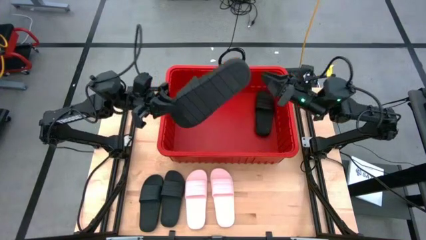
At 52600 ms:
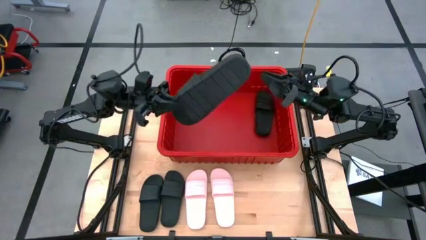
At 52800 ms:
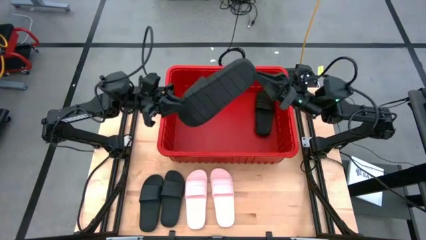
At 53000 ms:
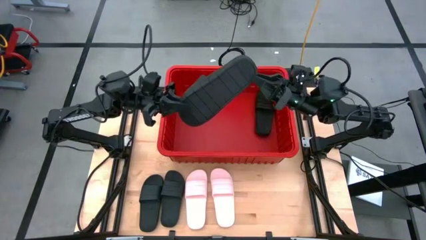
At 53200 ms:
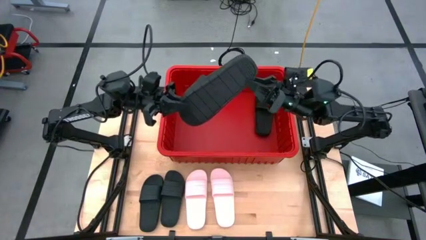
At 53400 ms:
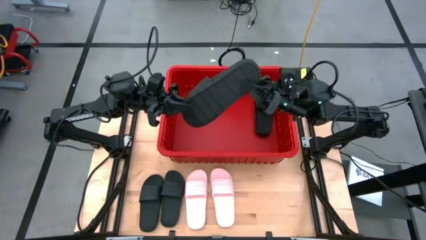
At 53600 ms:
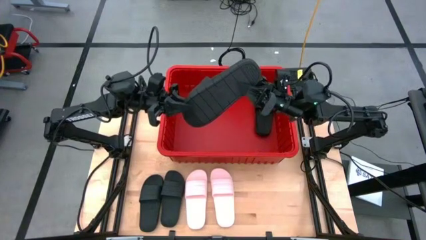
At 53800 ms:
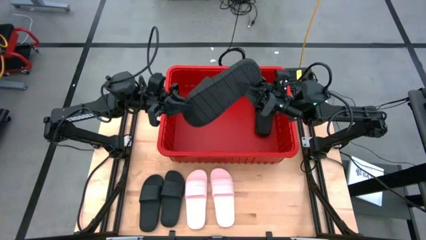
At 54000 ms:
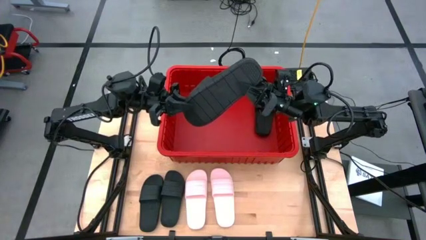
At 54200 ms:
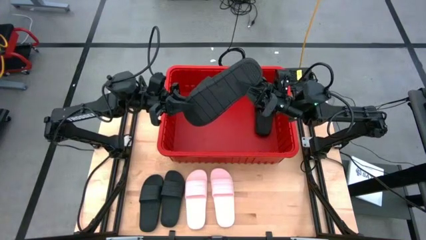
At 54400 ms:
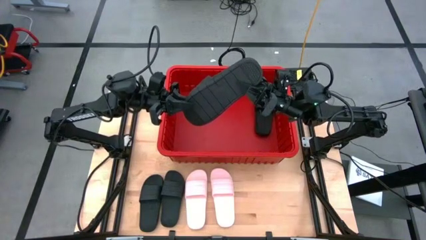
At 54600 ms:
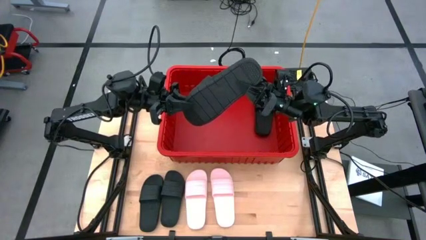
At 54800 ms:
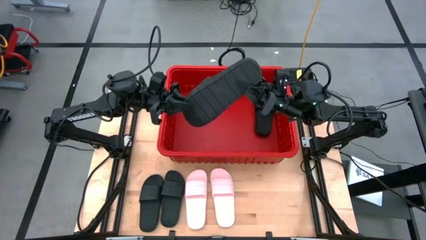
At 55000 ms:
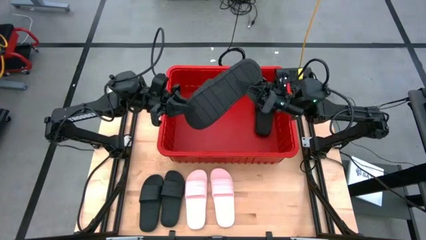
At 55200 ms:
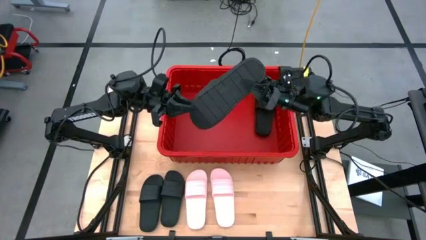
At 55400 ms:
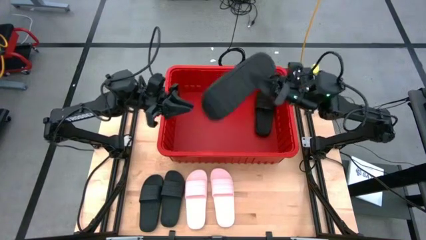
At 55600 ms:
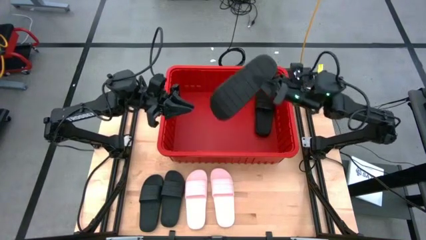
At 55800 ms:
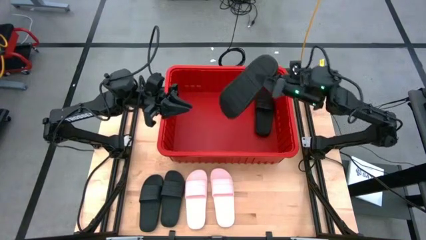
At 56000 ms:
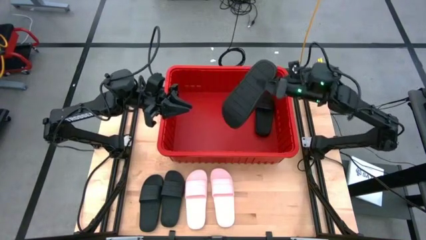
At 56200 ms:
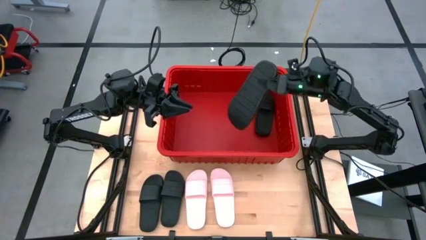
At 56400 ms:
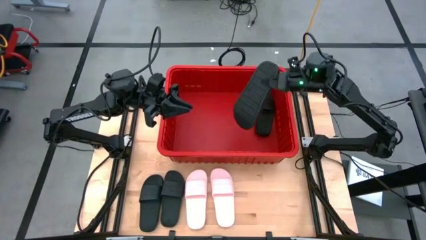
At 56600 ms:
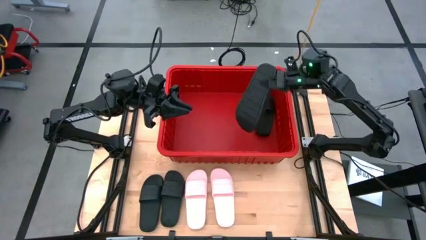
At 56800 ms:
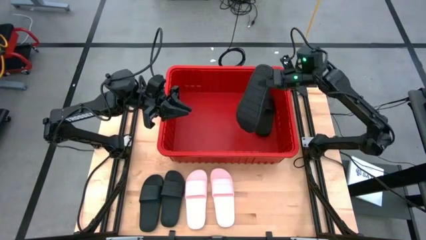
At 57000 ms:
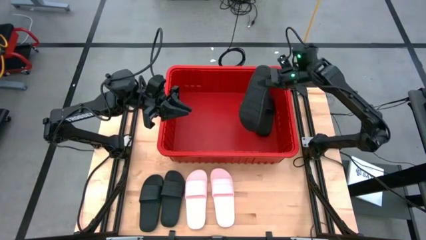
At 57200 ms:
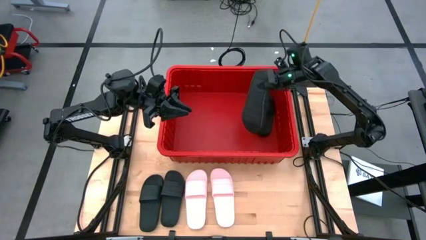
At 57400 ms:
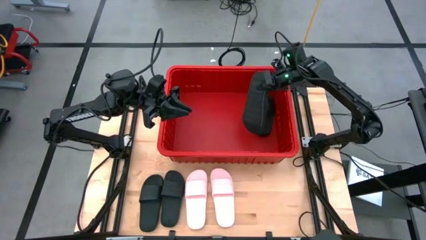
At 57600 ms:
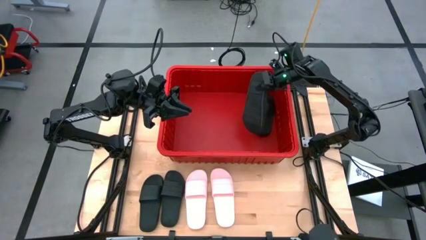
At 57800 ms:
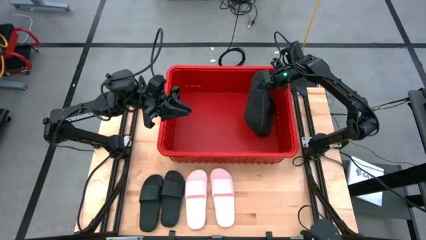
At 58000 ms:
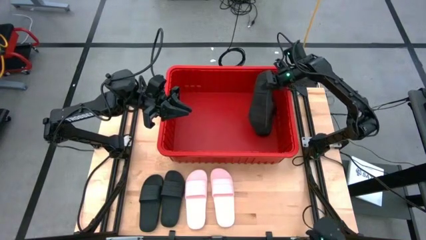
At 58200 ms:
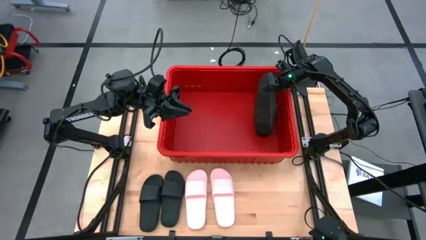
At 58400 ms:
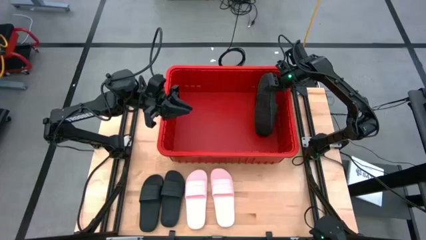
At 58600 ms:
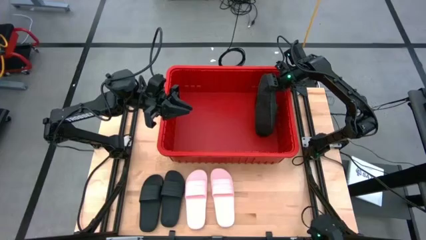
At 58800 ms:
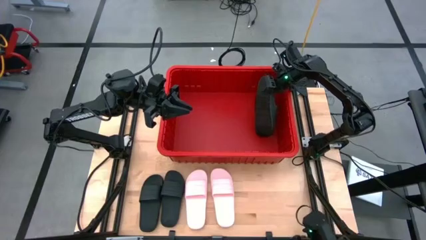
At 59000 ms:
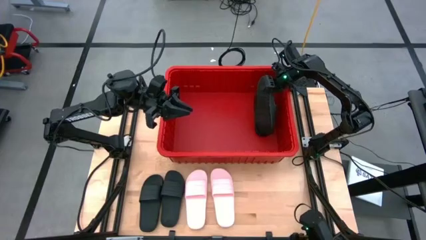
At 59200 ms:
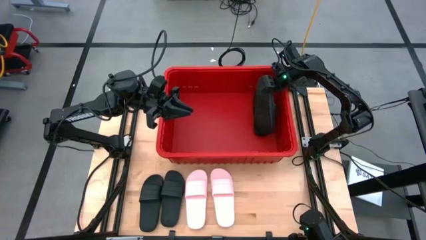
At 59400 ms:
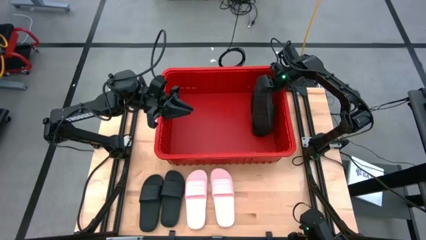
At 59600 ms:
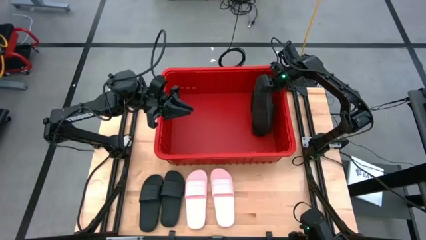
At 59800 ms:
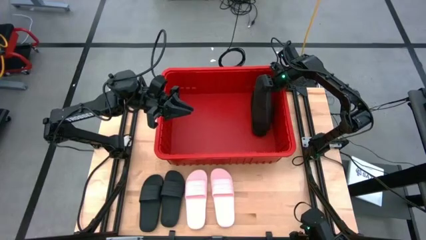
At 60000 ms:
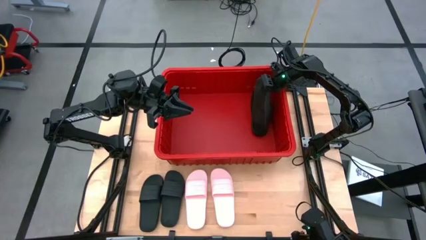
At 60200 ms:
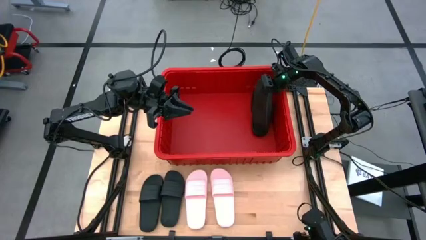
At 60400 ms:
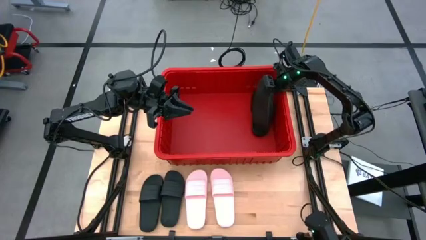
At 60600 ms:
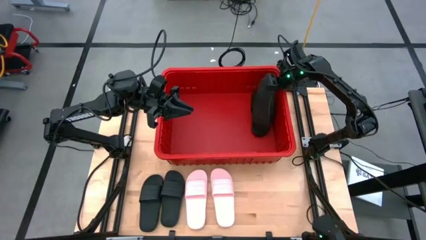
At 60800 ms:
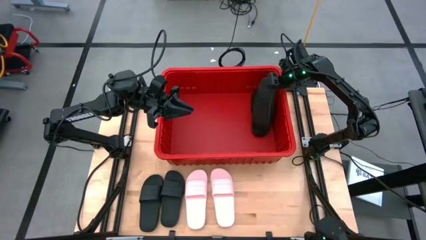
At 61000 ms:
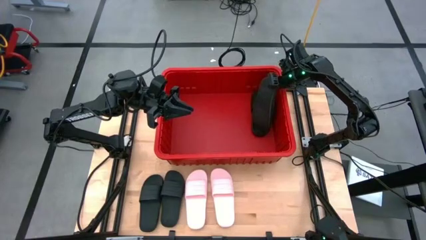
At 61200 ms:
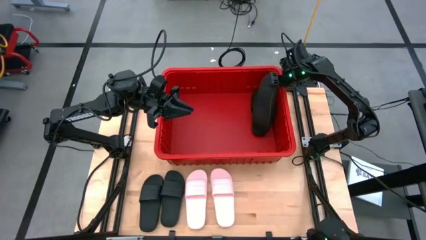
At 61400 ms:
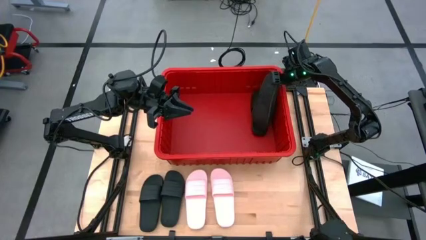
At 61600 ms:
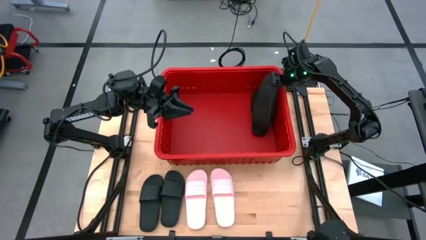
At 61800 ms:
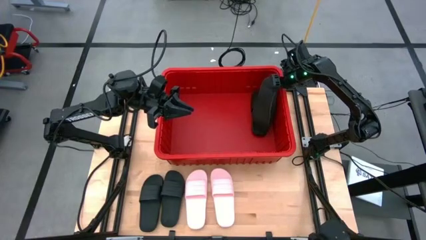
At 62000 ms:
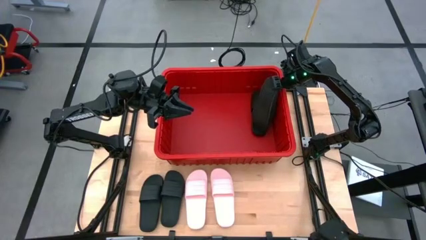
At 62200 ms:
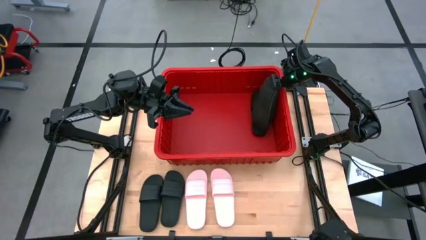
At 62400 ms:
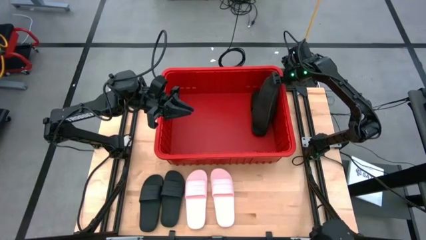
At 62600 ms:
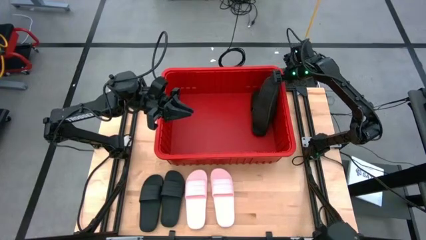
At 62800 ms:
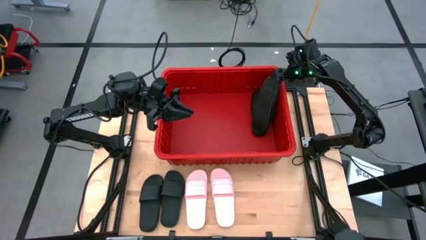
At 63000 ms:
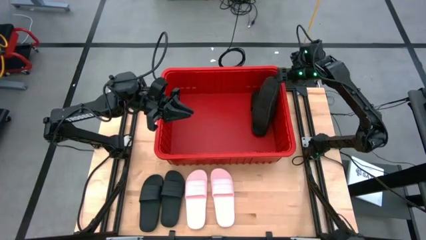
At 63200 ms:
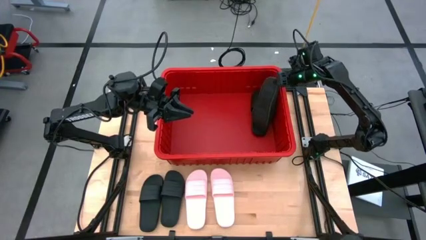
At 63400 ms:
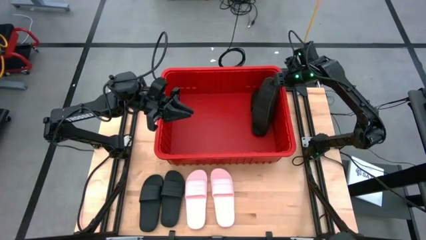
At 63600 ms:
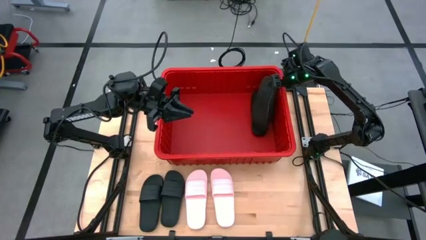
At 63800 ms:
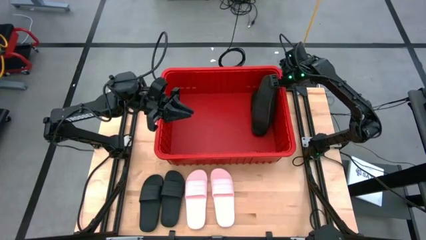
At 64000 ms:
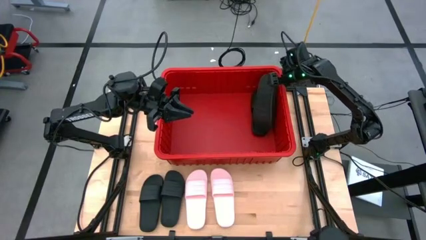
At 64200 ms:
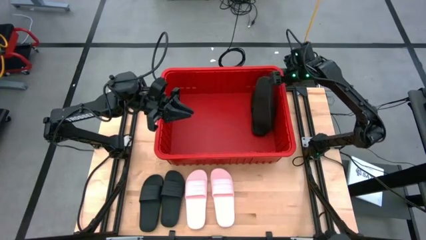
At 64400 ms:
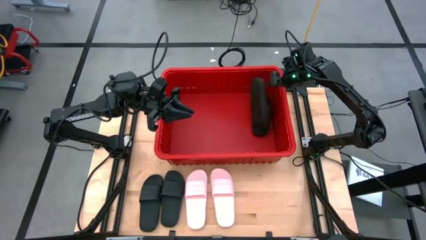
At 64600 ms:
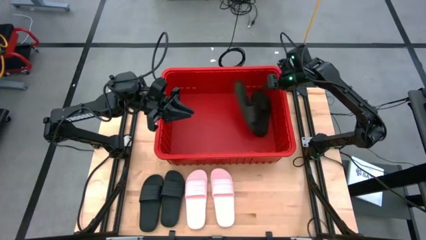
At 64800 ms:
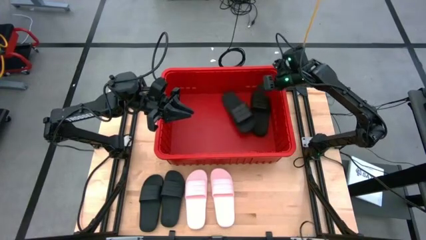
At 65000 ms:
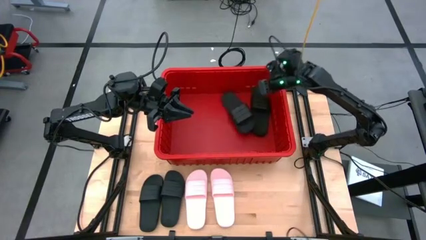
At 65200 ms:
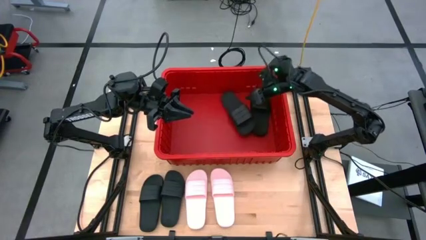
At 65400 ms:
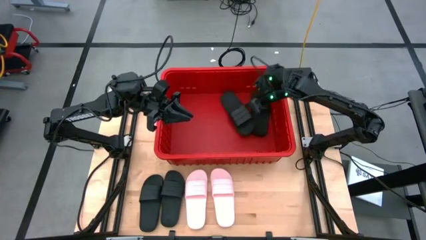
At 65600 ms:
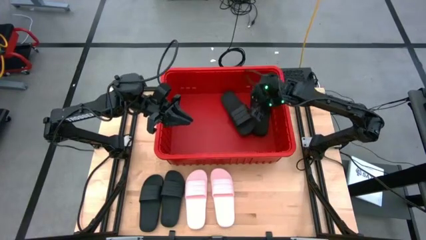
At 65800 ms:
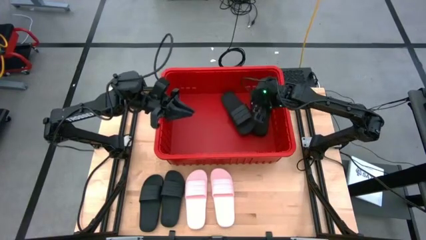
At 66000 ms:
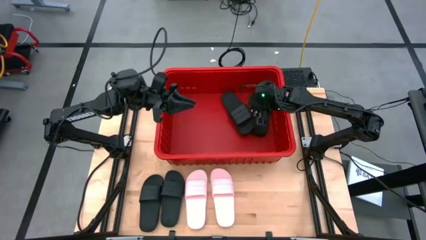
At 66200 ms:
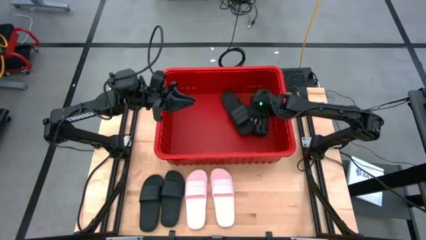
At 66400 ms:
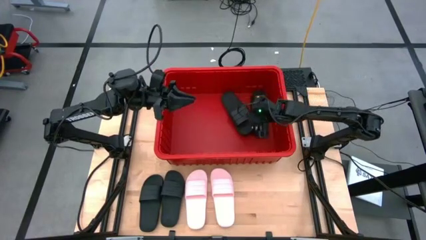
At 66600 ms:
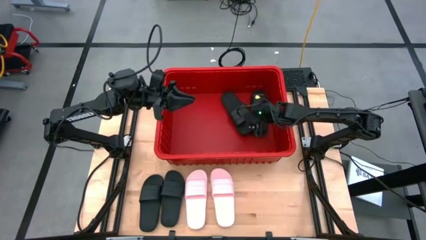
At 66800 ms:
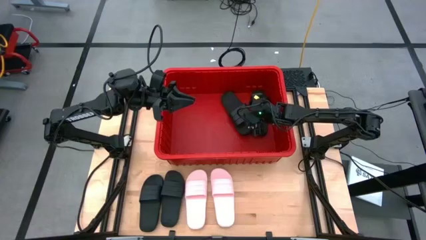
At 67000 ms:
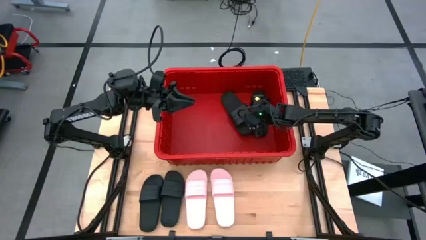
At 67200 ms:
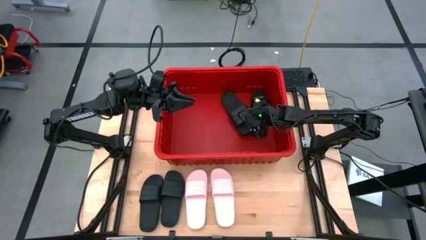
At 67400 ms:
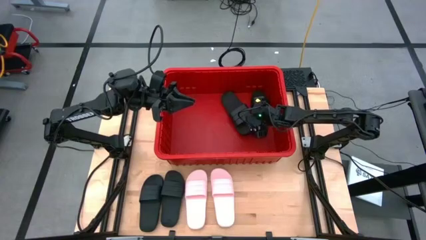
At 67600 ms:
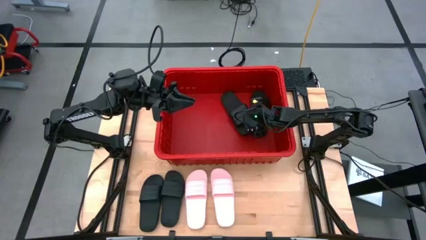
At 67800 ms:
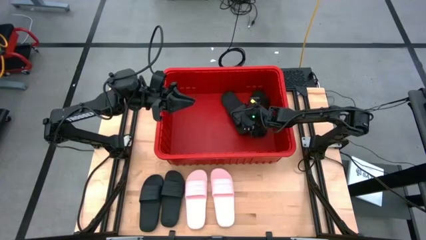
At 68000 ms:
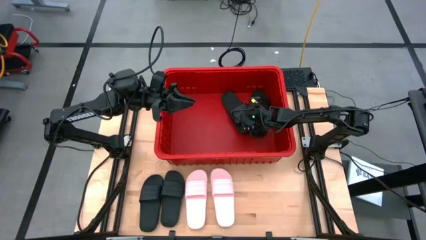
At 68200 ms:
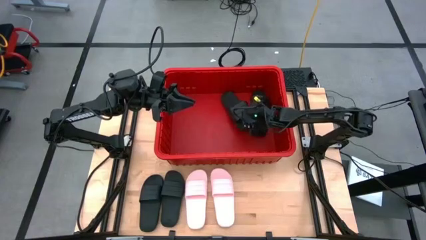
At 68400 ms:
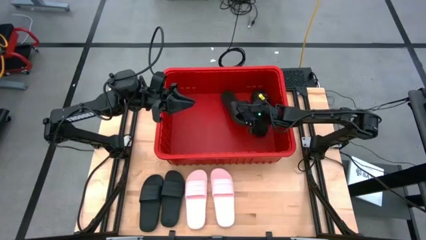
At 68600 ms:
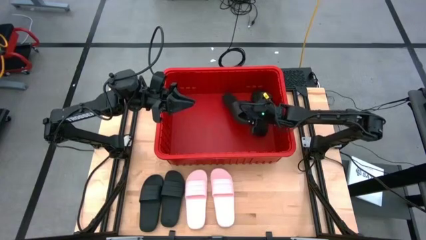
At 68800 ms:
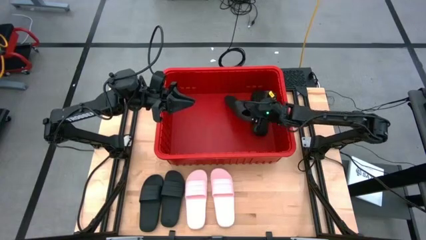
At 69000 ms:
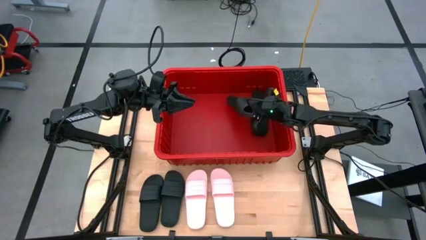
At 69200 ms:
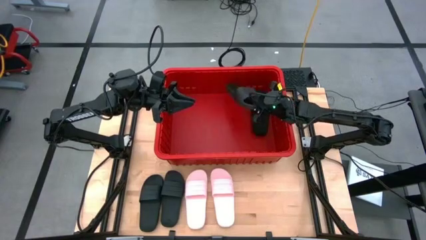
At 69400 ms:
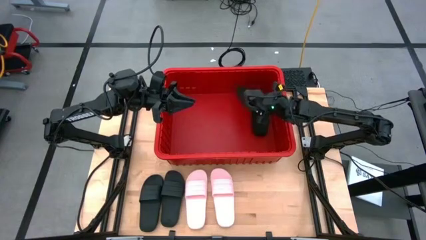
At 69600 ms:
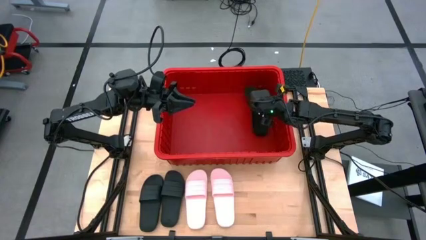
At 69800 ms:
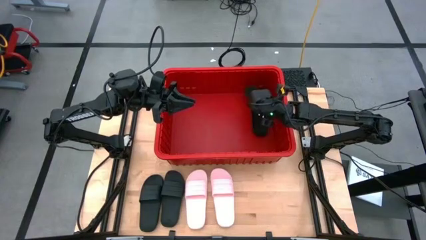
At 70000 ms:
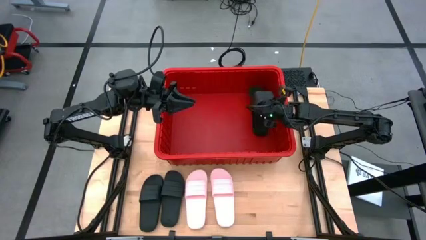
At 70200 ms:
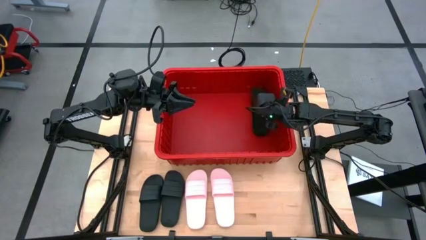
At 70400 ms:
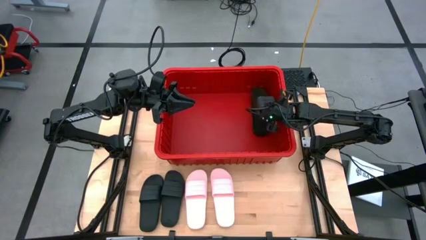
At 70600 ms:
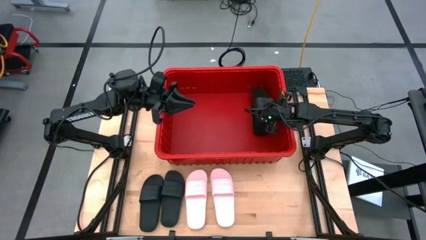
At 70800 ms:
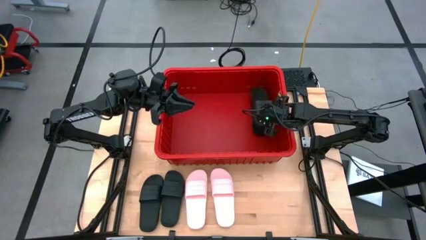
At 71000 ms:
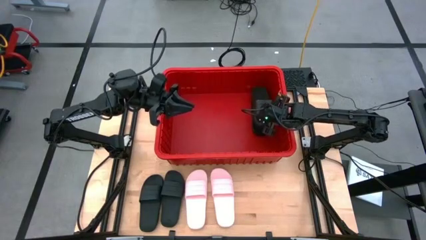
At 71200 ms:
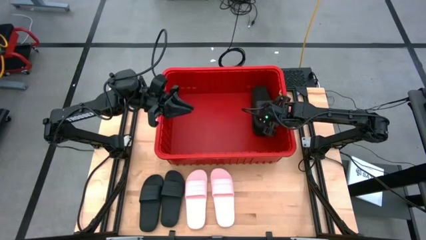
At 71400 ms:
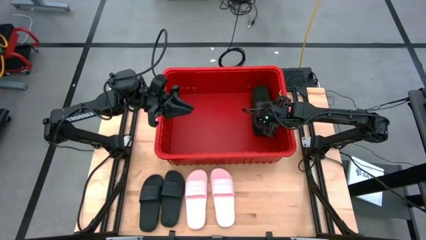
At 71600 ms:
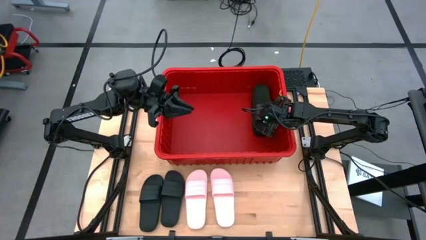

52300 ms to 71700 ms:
Task: Pick and place slides into bin
Put the black slide into the red organizer bin
